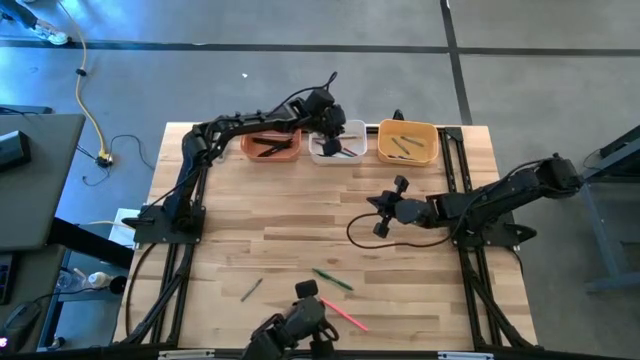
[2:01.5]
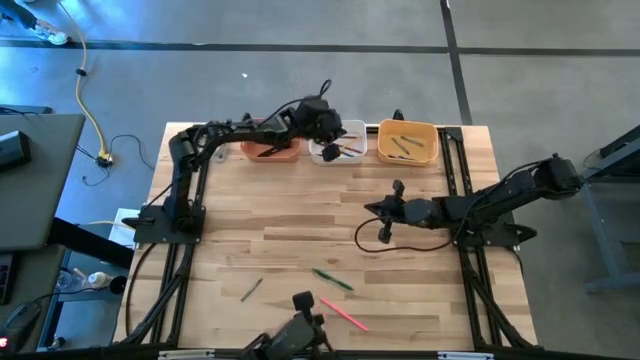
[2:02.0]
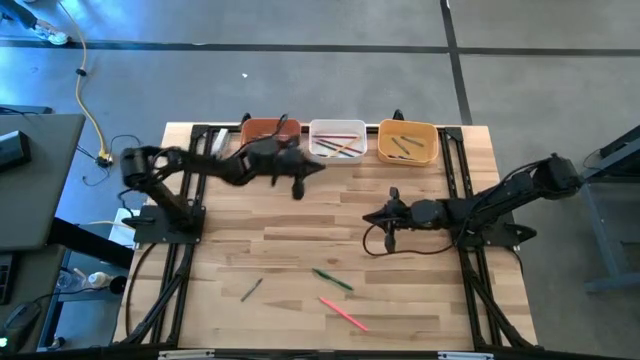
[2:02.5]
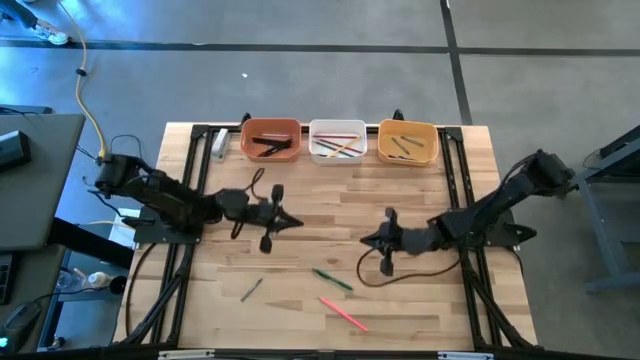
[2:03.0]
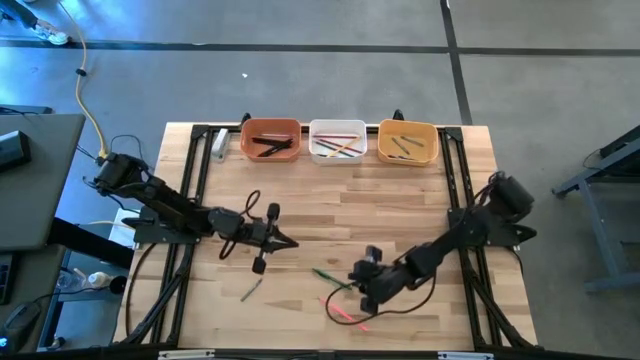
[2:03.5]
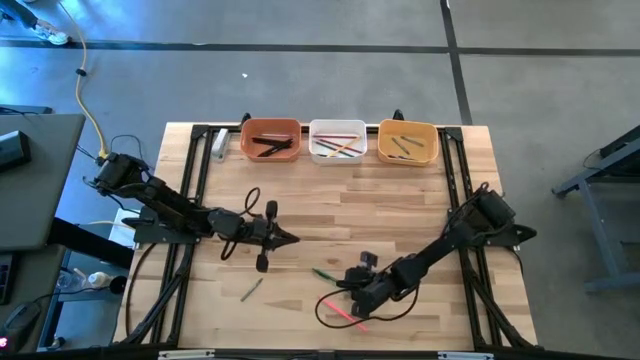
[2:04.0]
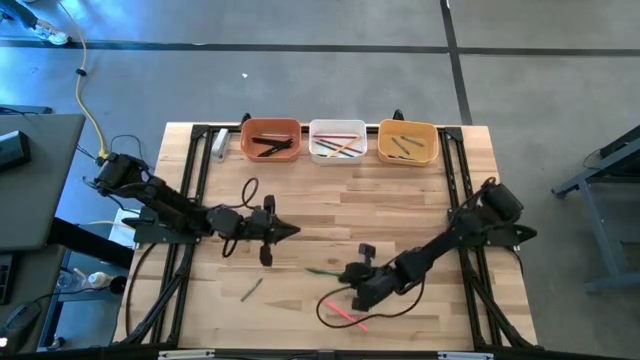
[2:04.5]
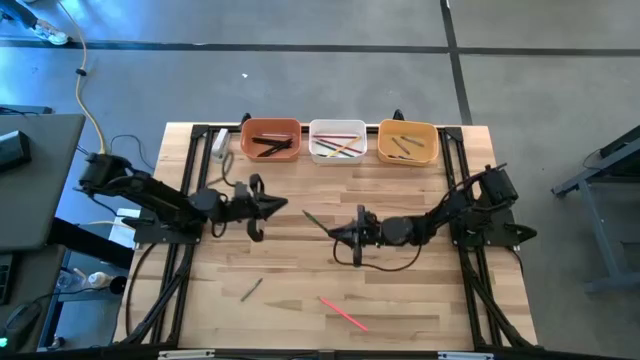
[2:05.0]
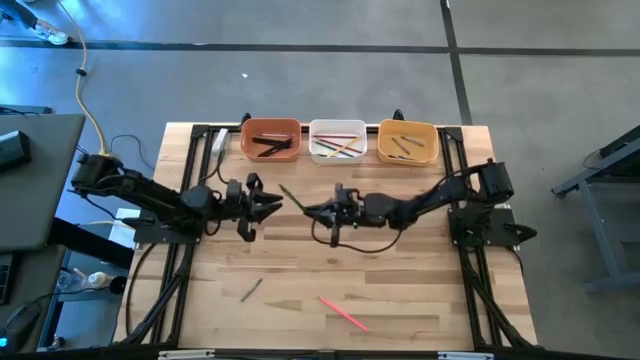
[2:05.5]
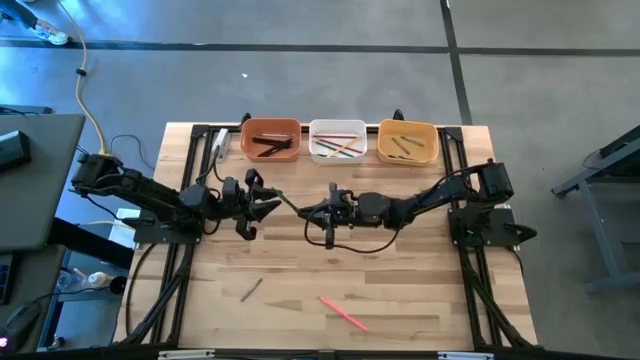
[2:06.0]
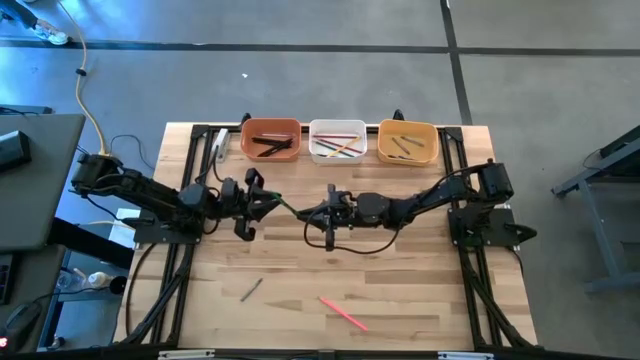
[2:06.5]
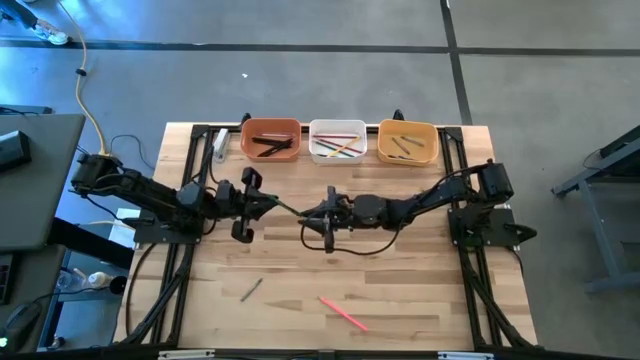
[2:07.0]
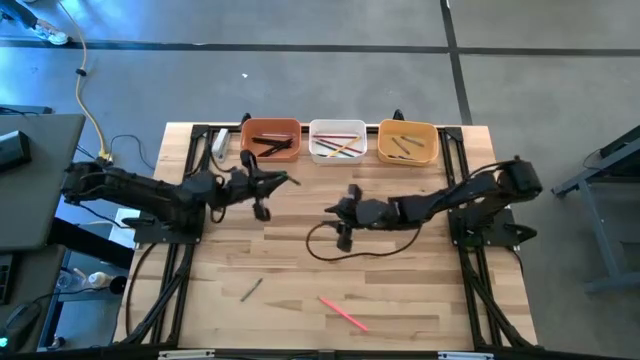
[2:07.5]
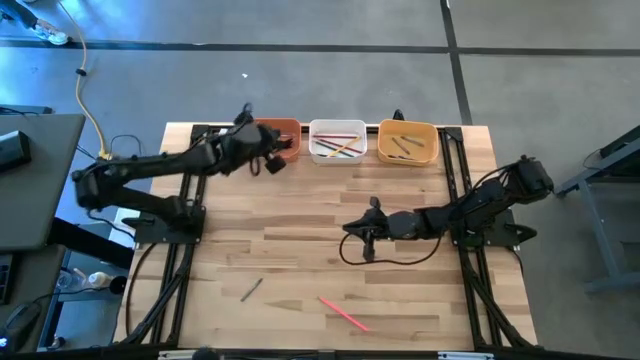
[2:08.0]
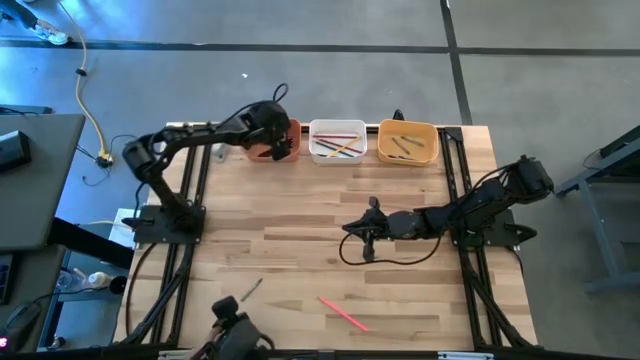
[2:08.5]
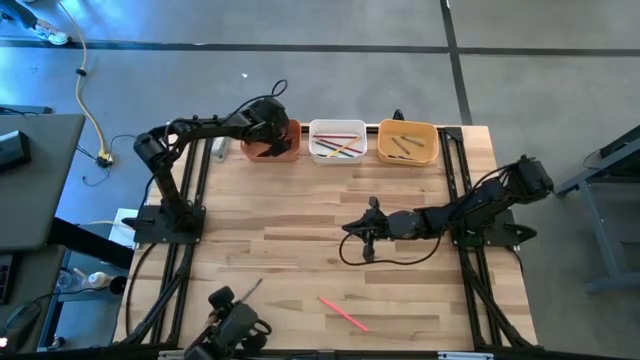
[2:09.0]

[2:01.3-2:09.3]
Task: Sort crayons/erasers/pens/pencils in bins
Put the green pen into the orange bin

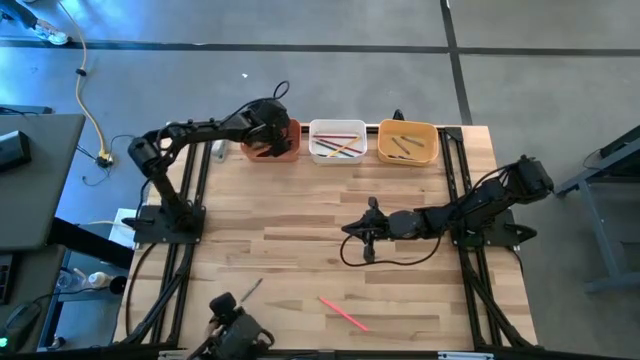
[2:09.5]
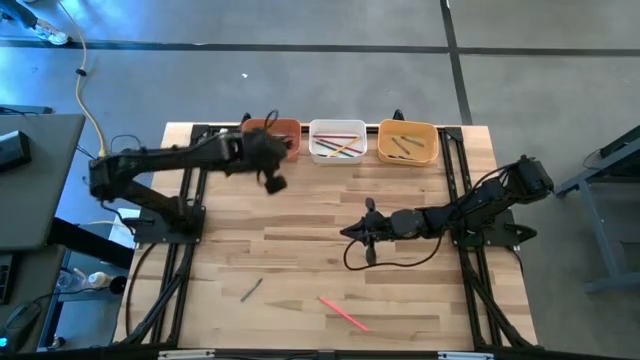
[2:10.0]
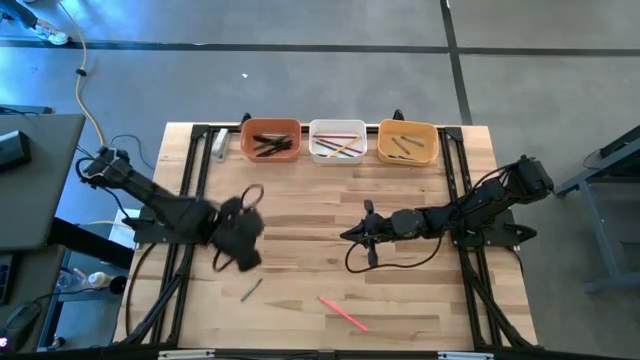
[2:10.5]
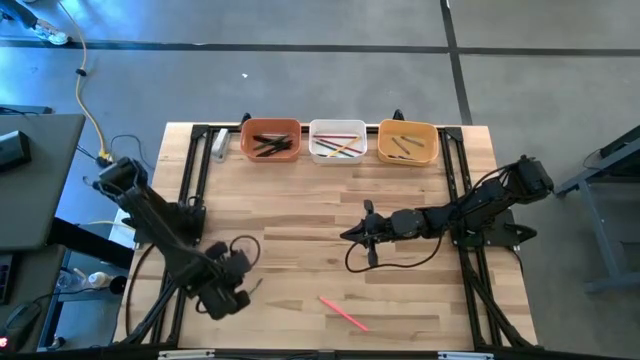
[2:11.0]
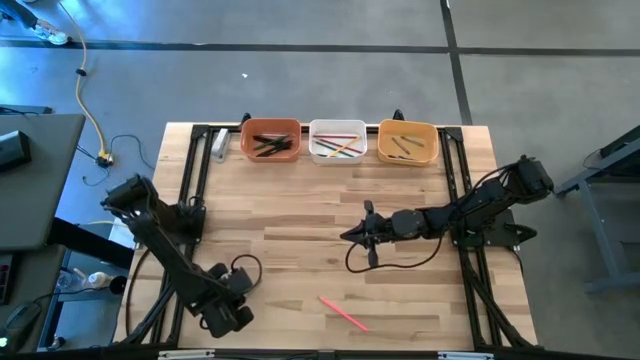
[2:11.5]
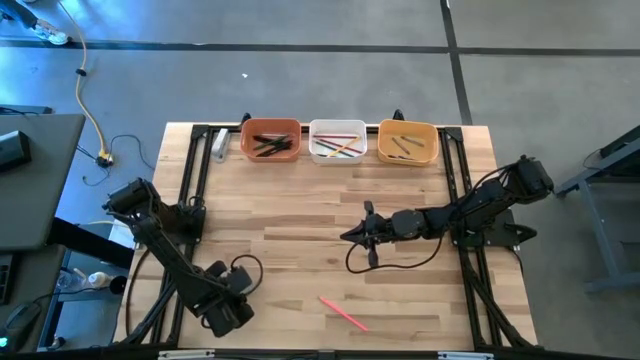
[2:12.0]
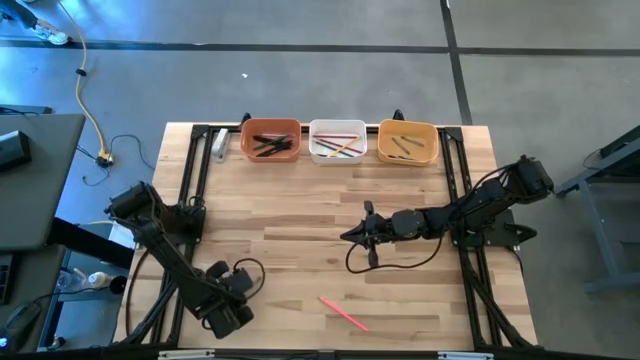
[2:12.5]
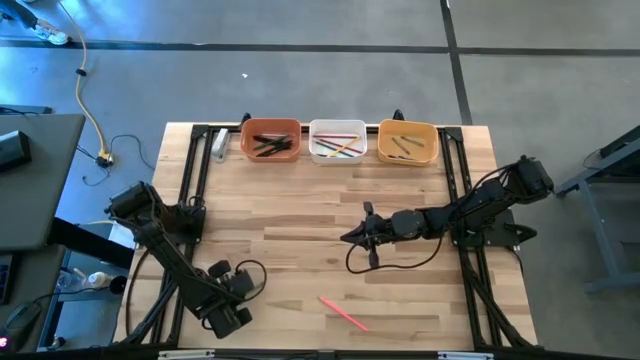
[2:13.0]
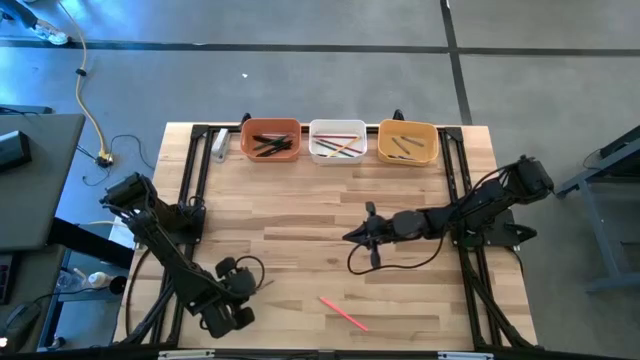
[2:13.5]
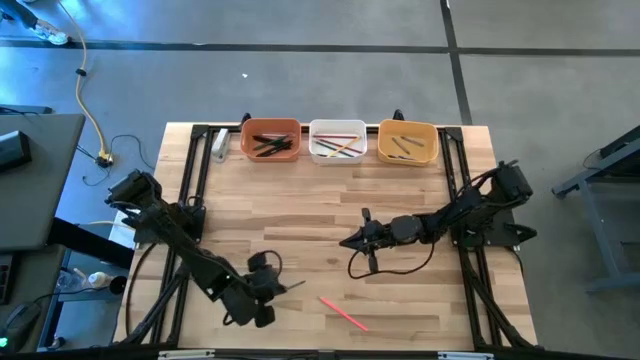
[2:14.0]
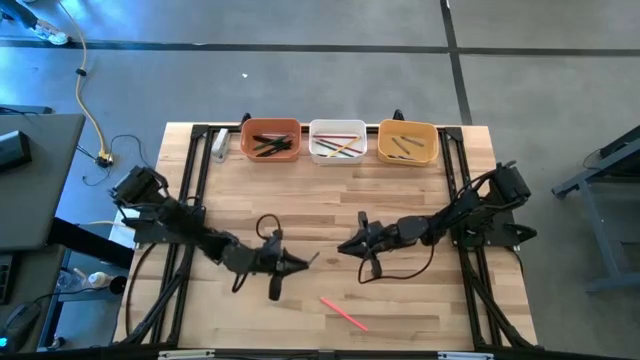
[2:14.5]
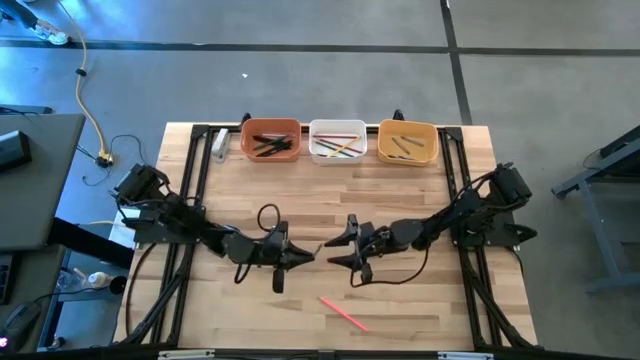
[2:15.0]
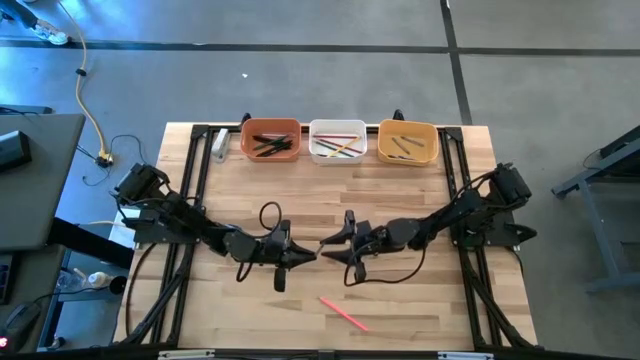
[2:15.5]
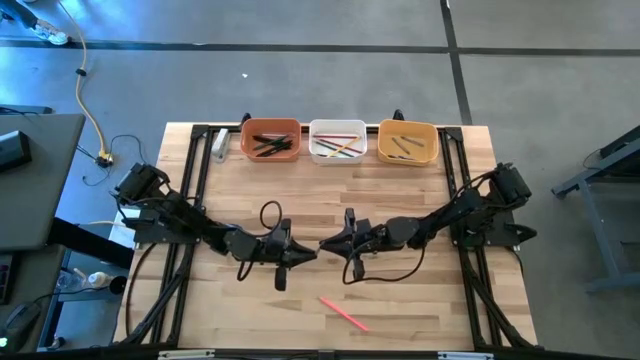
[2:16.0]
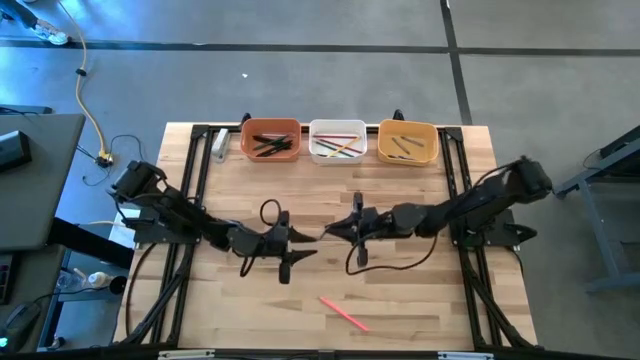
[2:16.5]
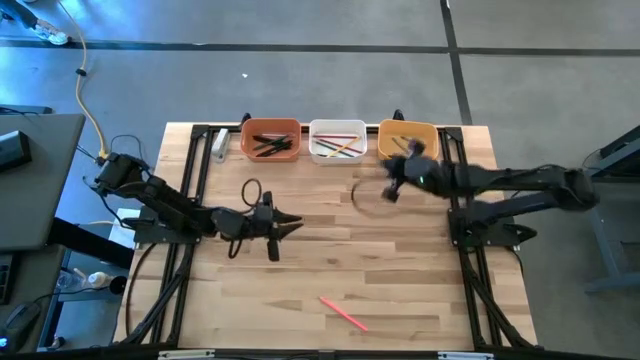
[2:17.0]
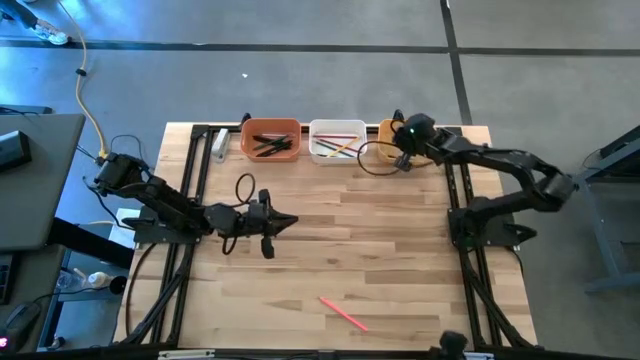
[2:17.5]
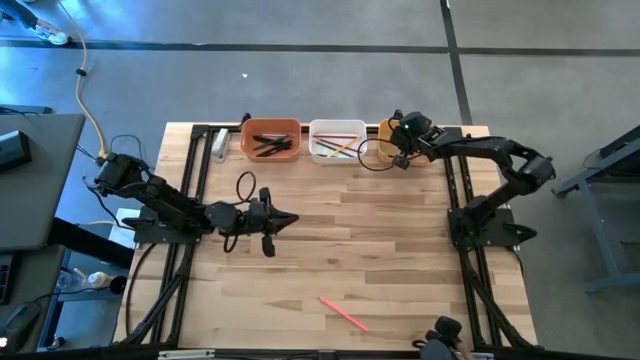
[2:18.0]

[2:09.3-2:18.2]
Put the gray crayon into the yellow bin

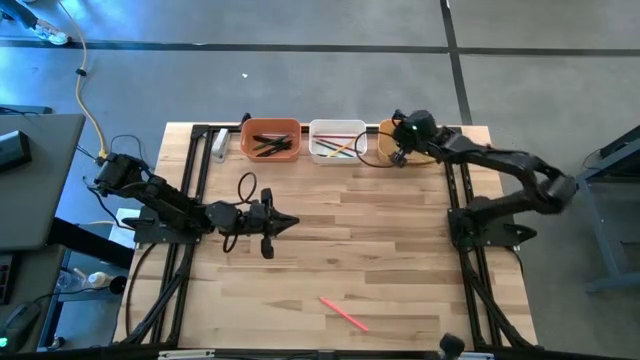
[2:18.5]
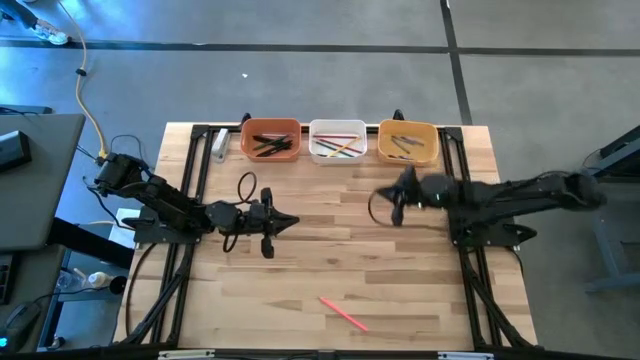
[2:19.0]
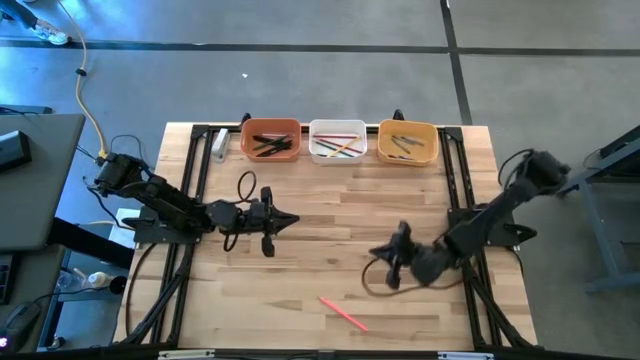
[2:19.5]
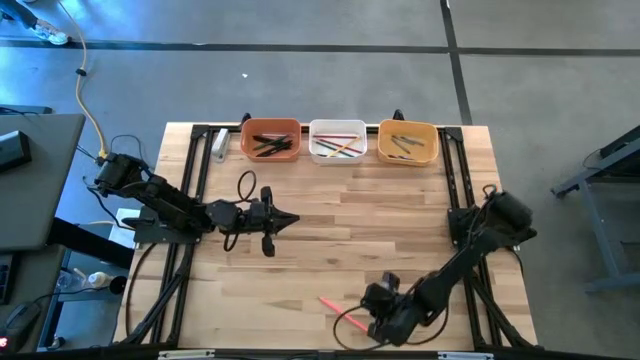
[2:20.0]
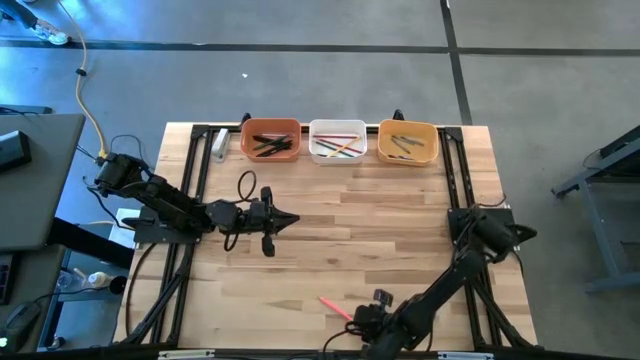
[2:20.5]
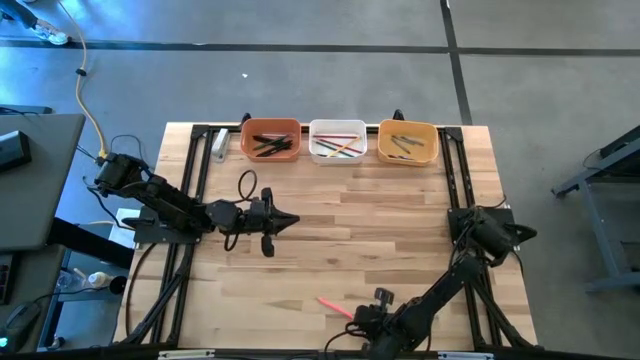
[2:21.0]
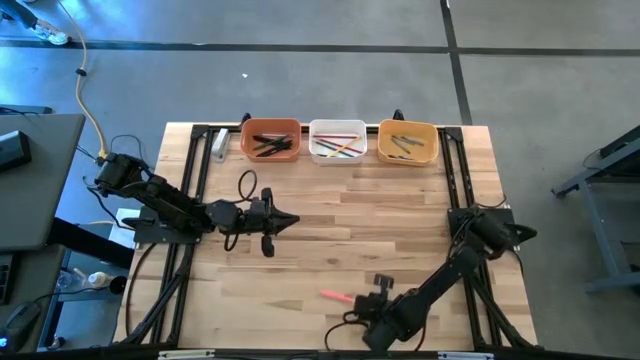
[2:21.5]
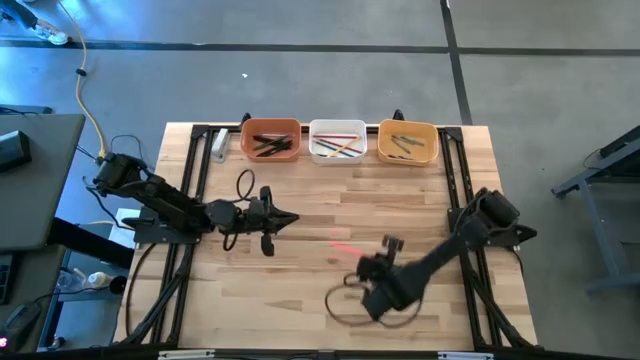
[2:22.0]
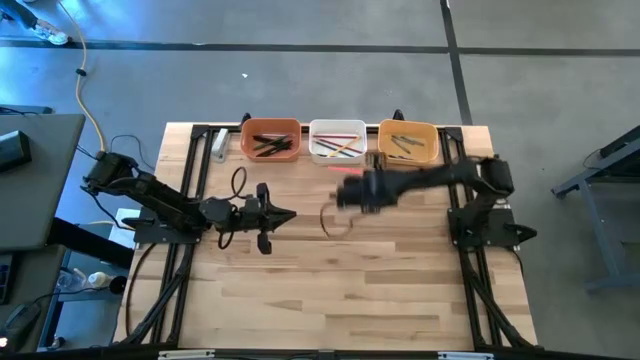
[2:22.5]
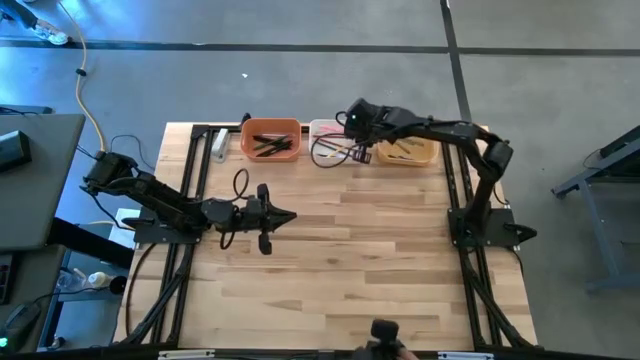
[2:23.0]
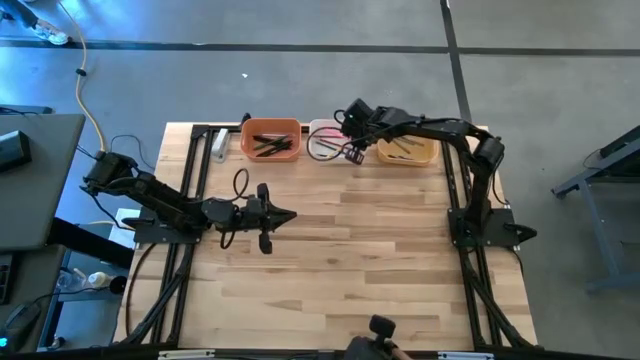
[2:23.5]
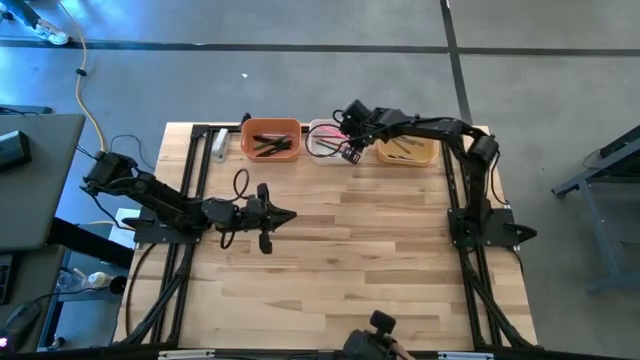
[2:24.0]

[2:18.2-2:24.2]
Put the pink pencil into the yellow bin
